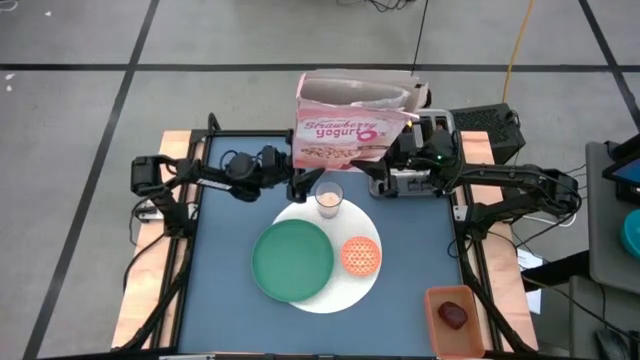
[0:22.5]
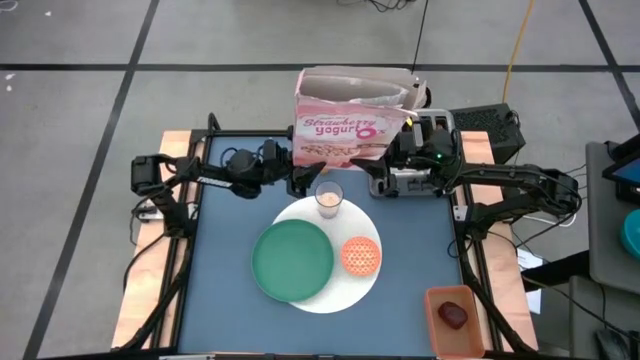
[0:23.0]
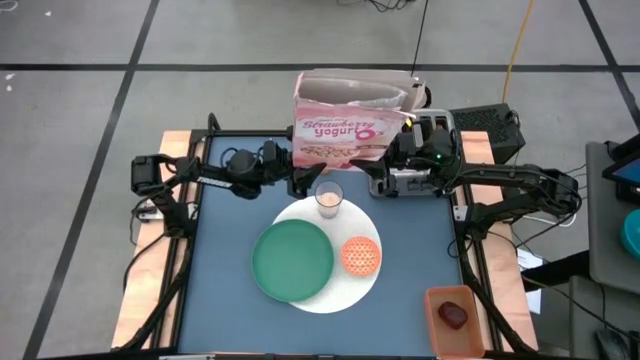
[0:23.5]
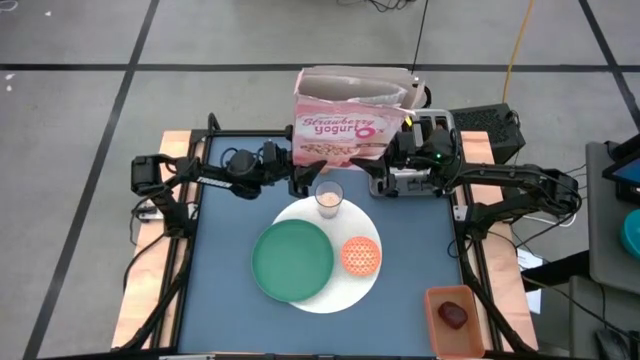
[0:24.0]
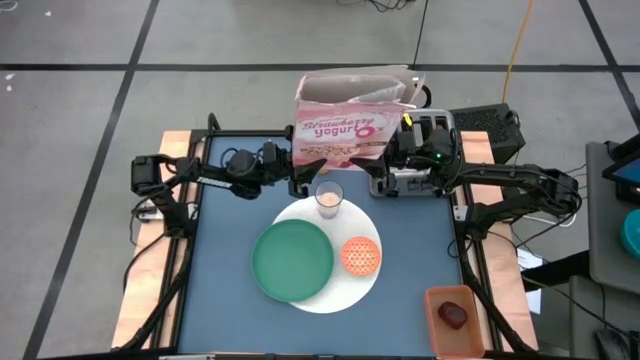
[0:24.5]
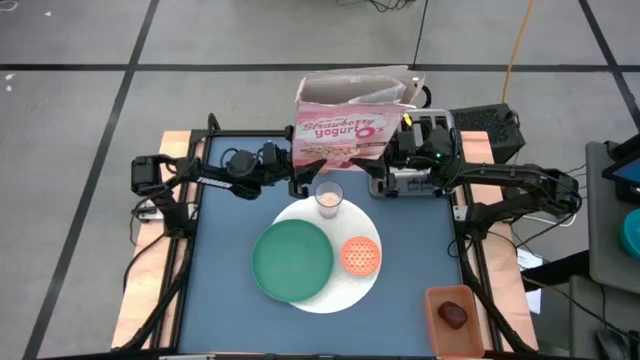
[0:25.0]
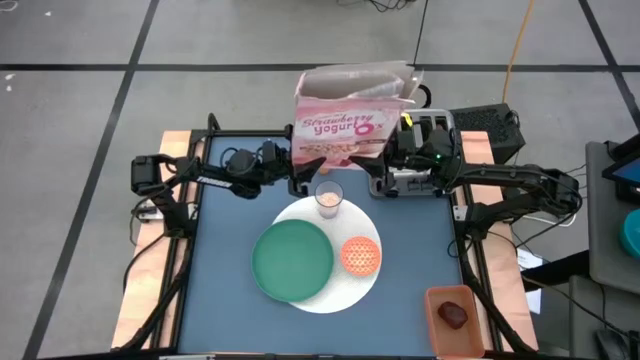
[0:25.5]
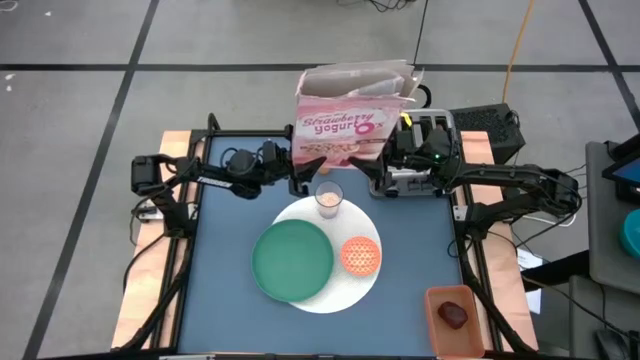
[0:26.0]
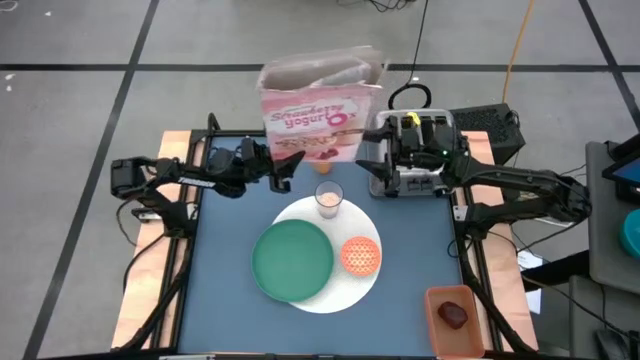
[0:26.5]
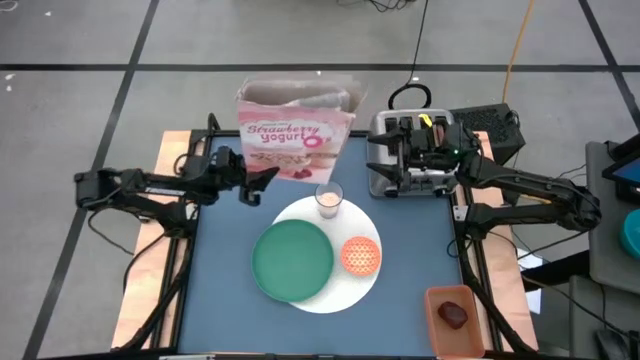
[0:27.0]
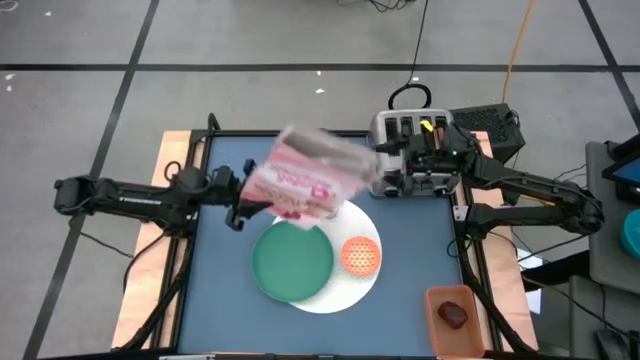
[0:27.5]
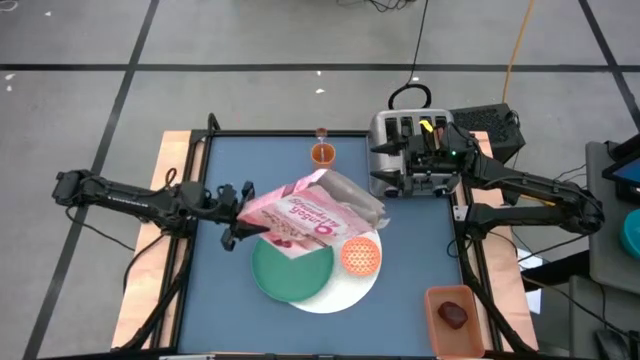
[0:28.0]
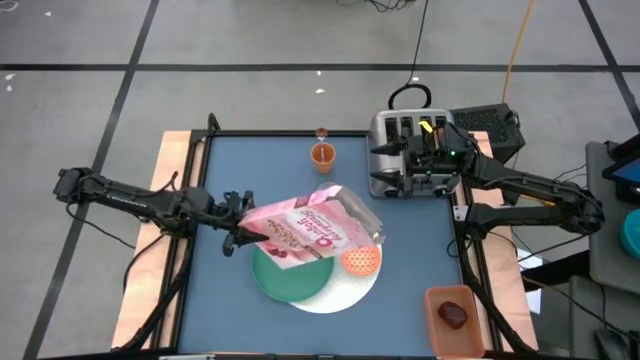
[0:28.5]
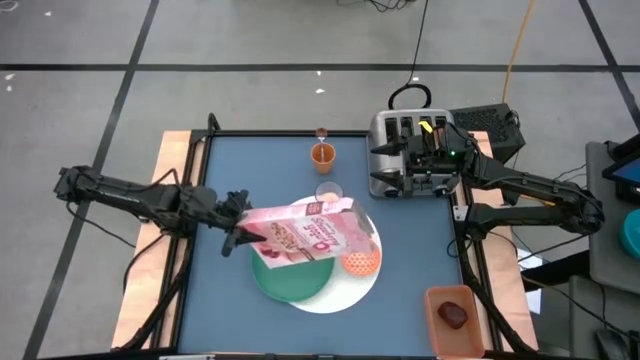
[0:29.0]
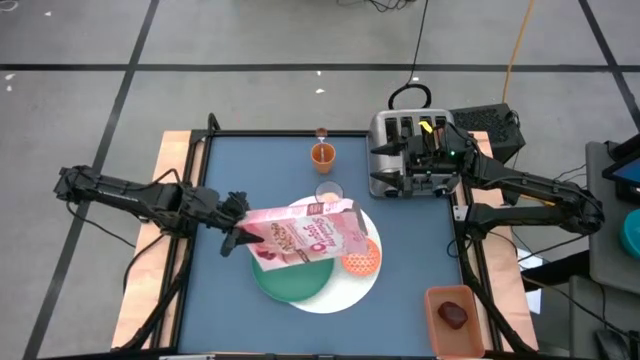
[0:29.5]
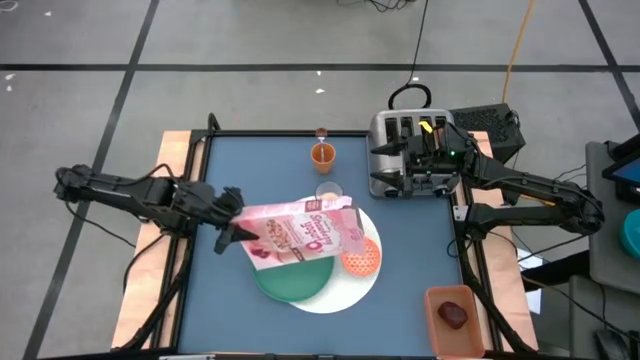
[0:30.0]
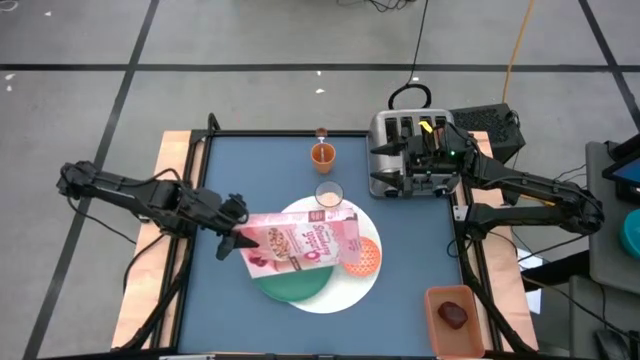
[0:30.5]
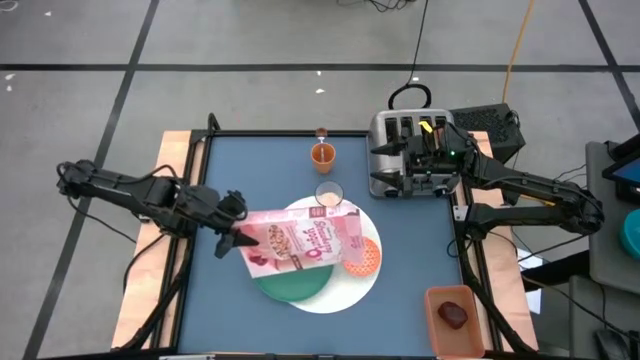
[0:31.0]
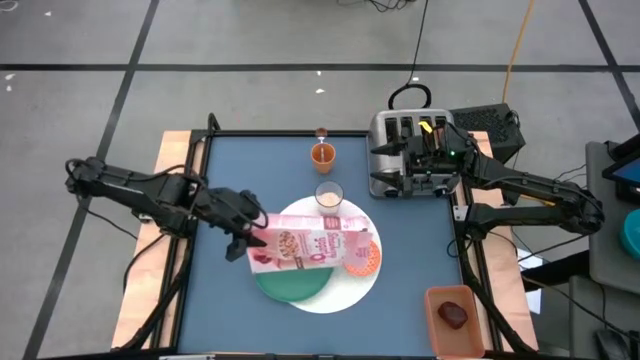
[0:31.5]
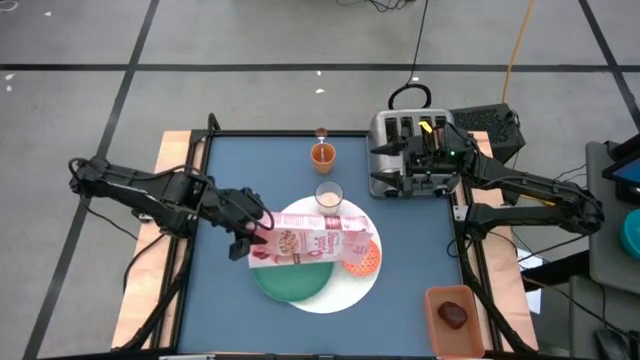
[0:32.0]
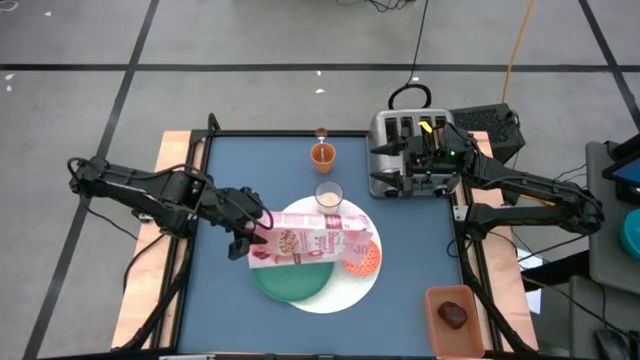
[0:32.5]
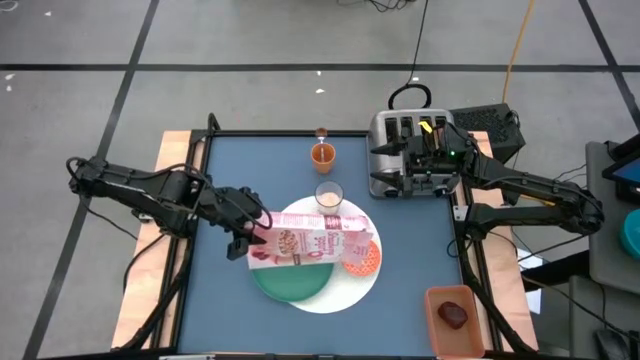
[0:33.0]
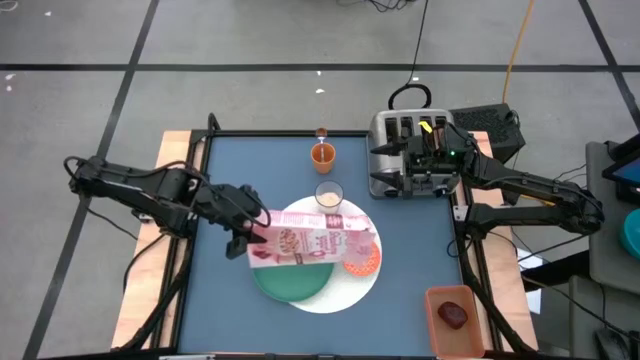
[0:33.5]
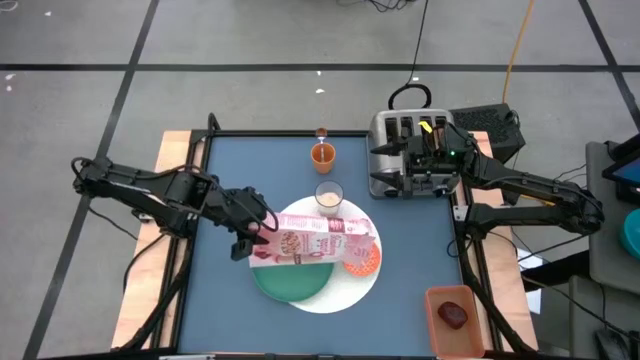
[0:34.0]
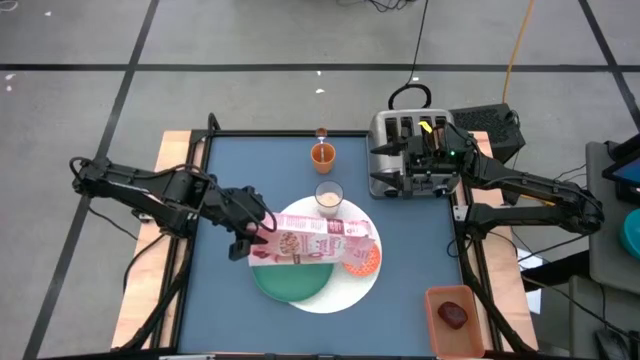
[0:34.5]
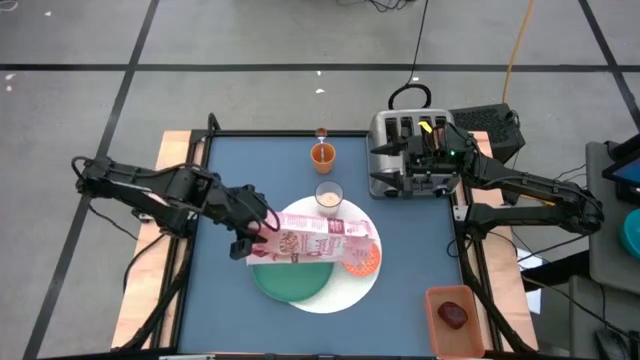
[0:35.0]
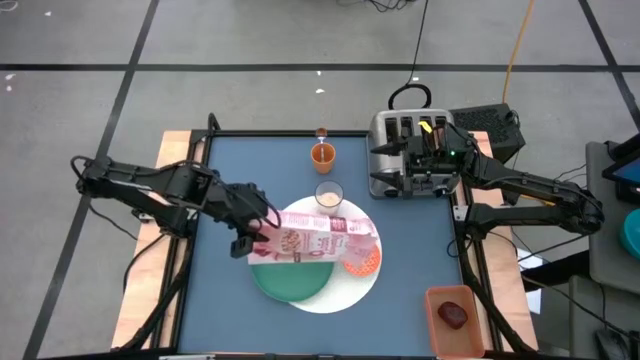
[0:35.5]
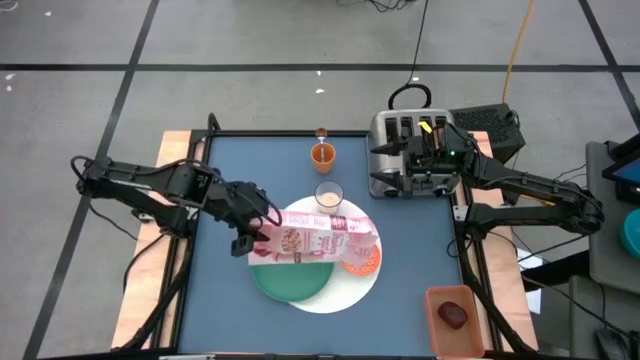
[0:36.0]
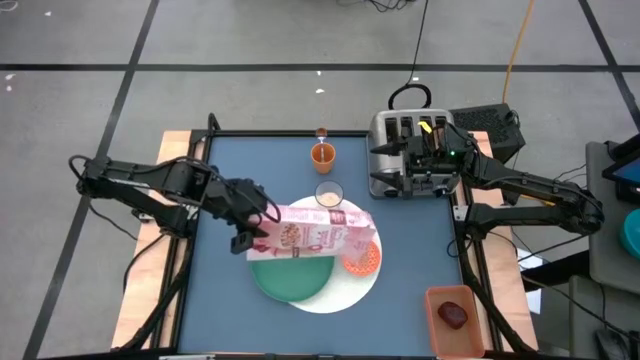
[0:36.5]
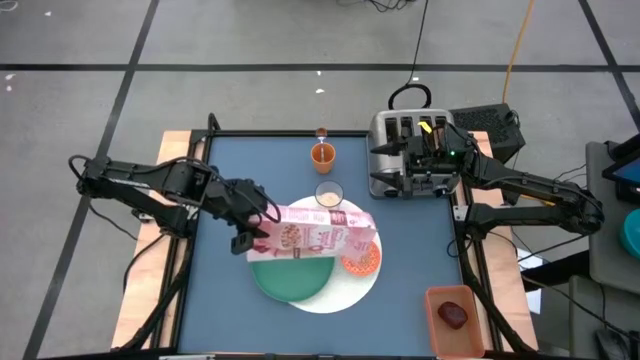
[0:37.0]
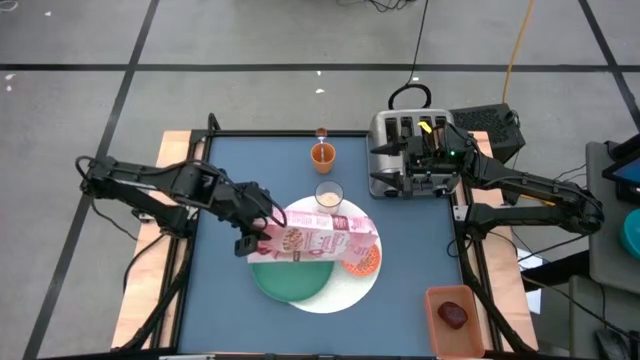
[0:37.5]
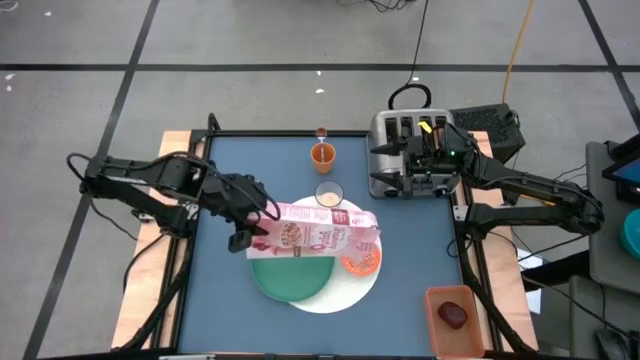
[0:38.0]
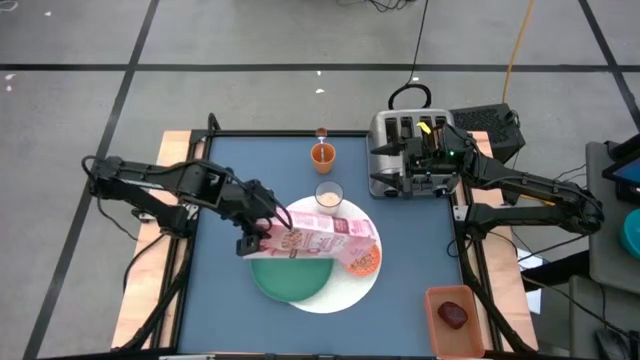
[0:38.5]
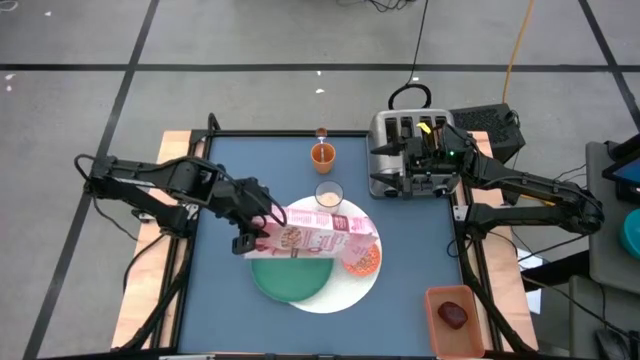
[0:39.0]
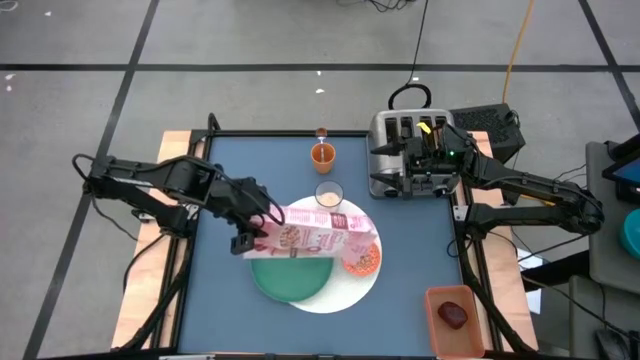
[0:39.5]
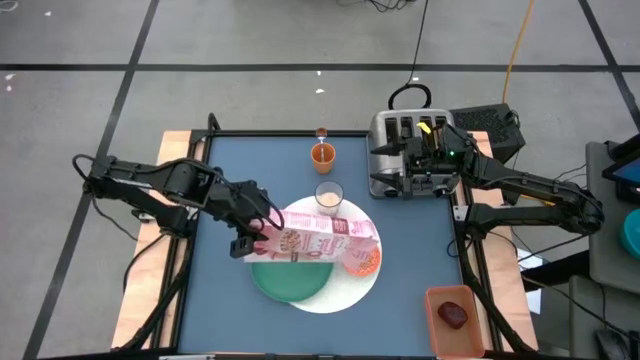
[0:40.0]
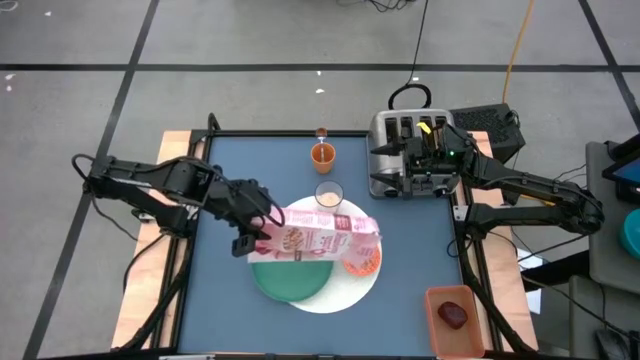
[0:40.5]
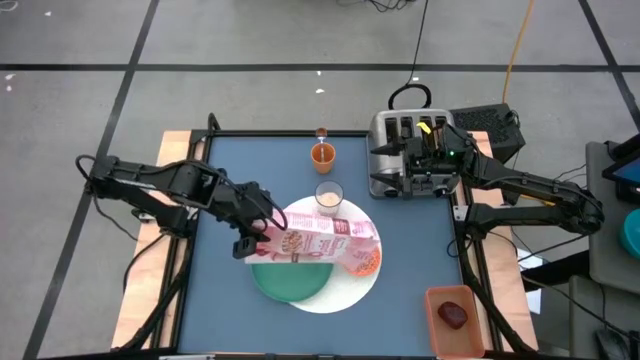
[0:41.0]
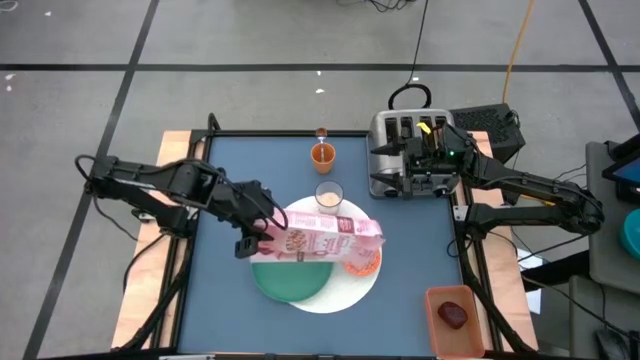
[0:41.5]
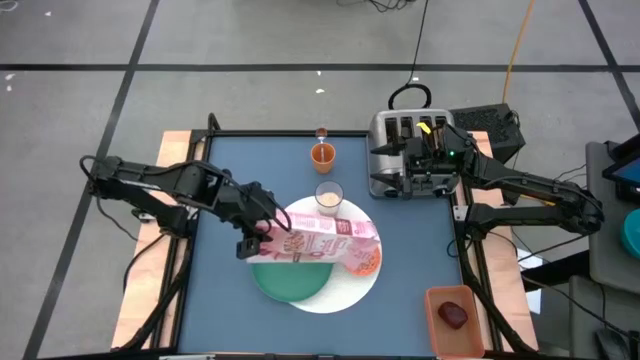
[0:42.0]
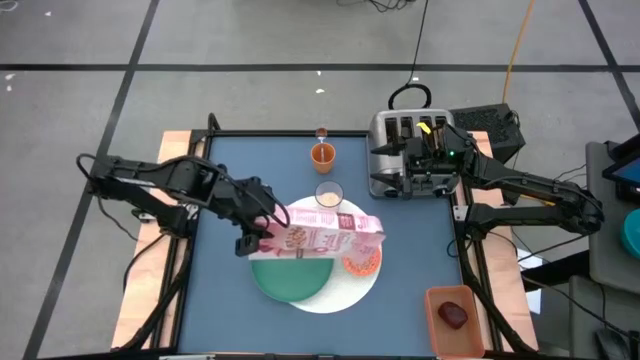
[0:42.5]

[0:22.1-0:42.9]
Task: Arrange a breakfast setting
Pour the cereals from the cereal box into the orange bowl

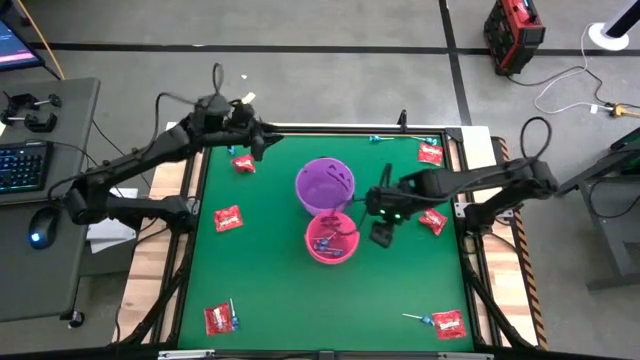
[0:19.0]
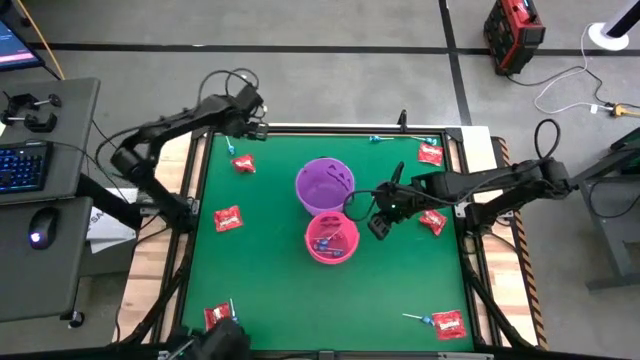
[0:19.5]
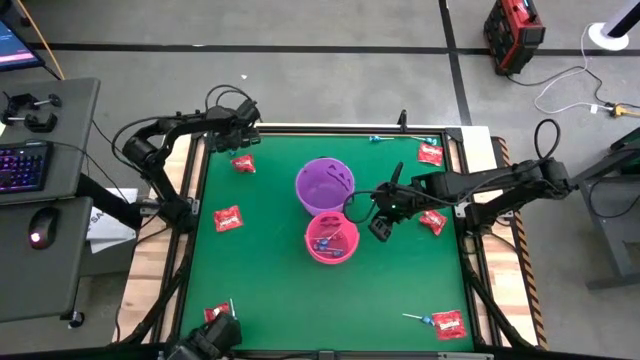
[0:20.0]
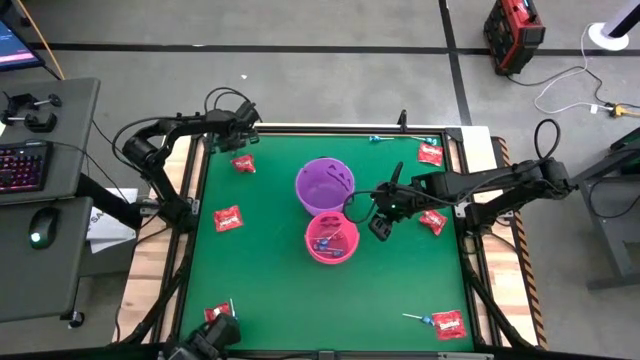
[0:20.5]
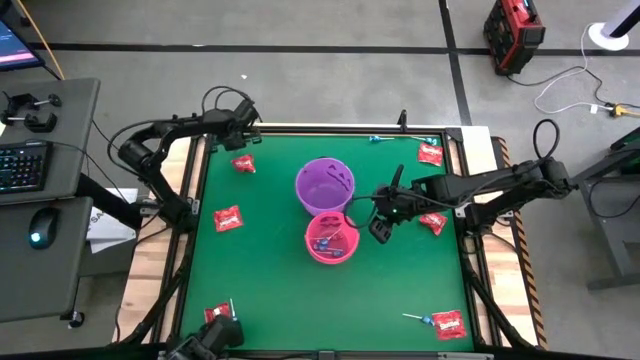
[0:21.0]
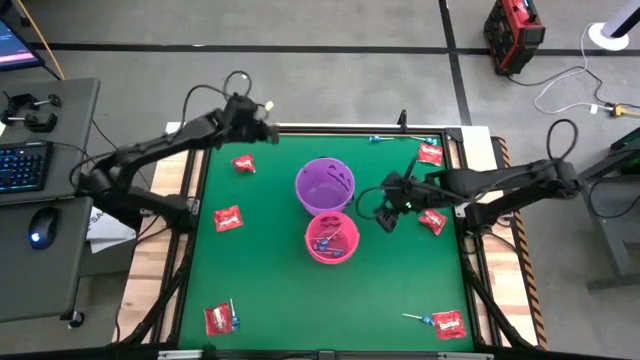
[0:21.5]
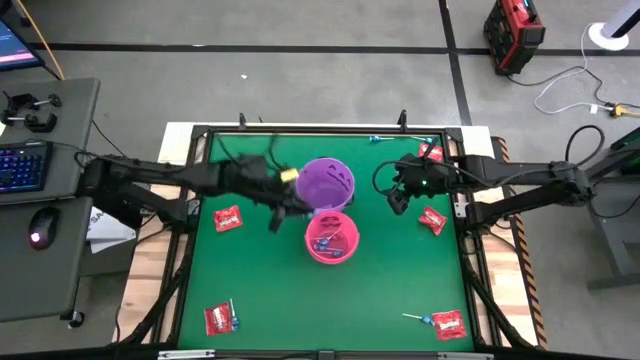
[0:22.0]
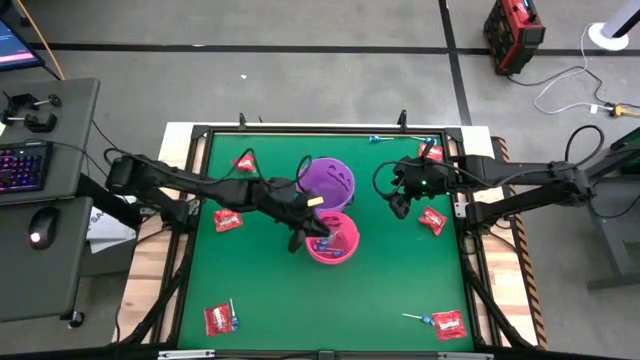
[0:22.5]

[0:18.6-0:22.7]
Task: Sort candy by brand, put in halloween buckets
Put the blue candy into the pink bucket
